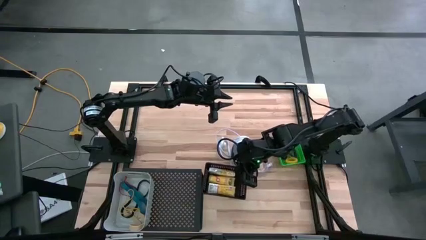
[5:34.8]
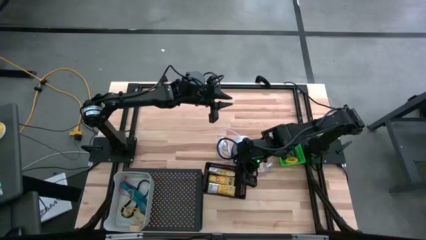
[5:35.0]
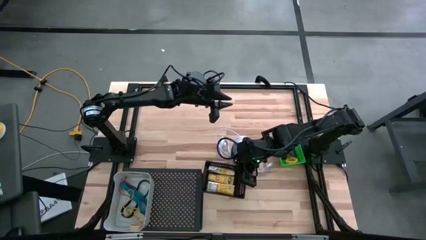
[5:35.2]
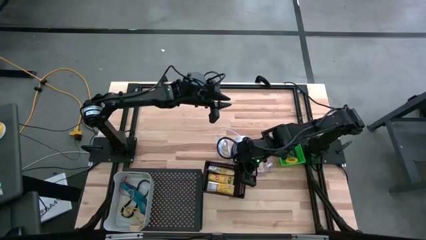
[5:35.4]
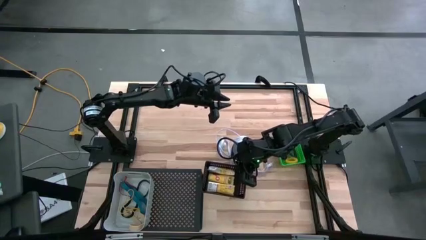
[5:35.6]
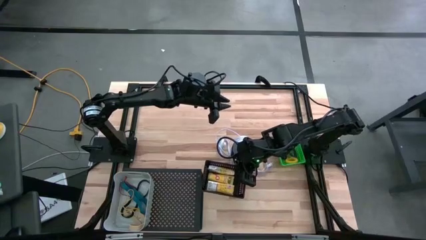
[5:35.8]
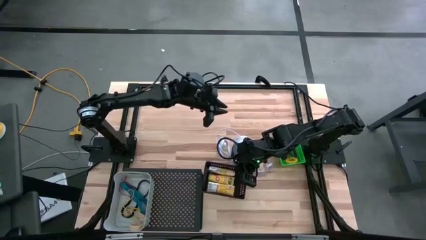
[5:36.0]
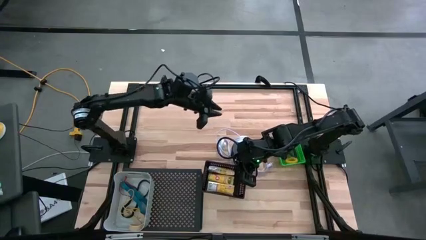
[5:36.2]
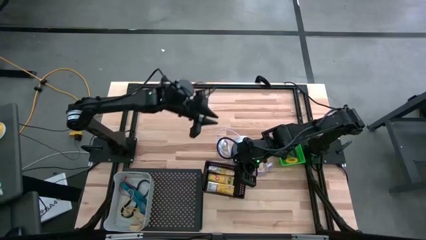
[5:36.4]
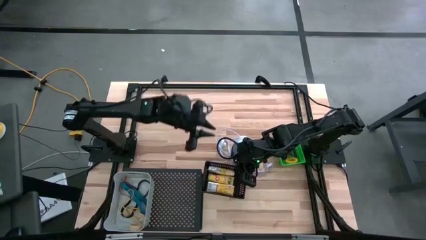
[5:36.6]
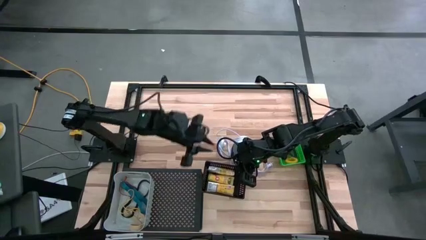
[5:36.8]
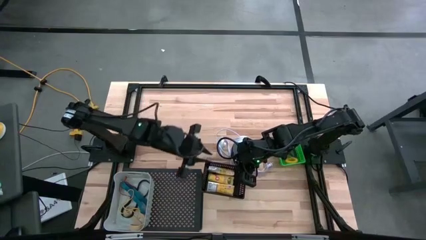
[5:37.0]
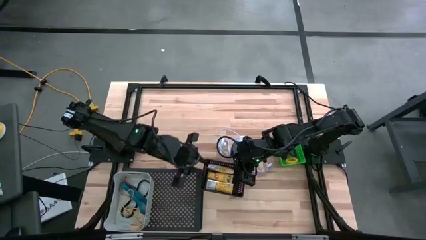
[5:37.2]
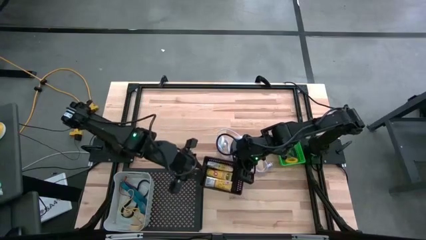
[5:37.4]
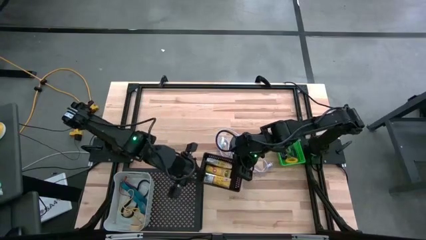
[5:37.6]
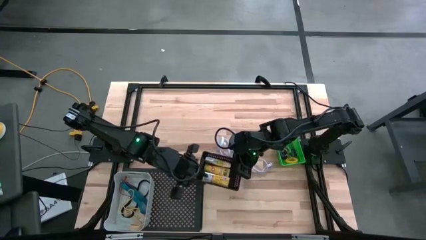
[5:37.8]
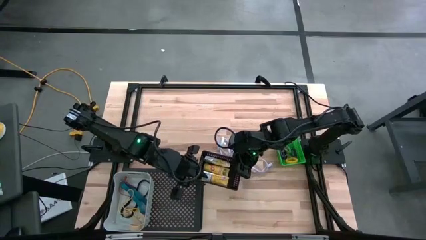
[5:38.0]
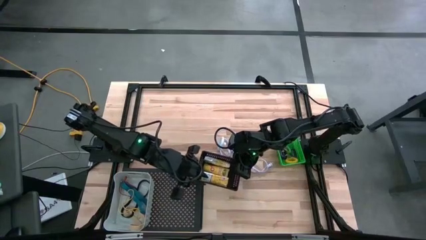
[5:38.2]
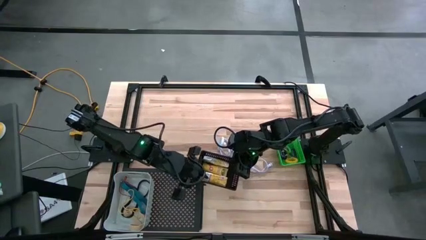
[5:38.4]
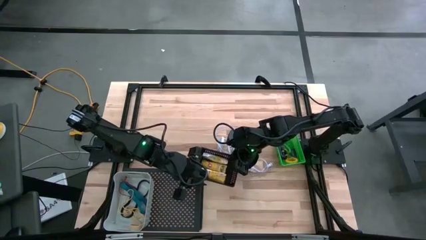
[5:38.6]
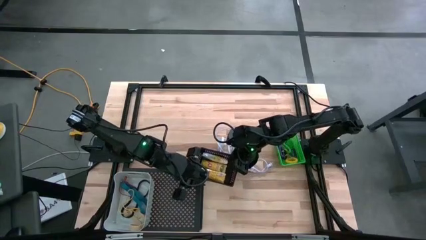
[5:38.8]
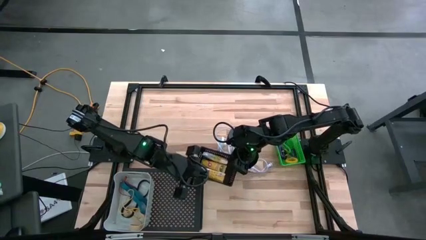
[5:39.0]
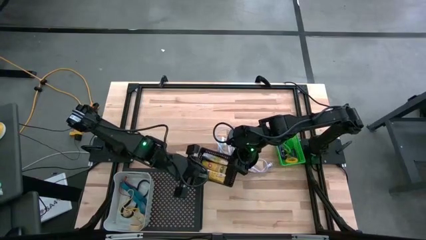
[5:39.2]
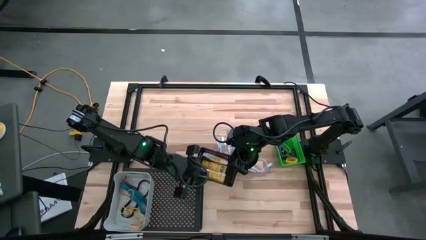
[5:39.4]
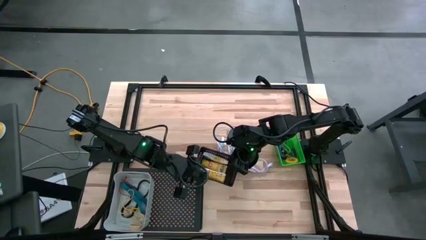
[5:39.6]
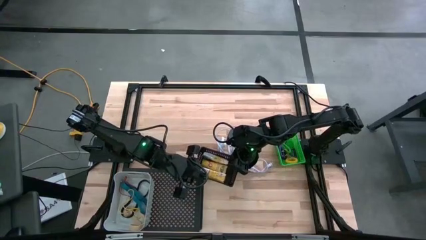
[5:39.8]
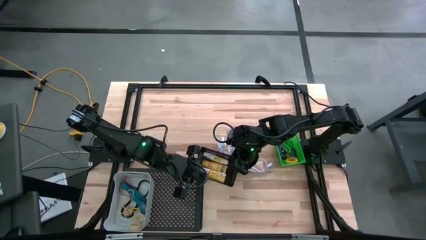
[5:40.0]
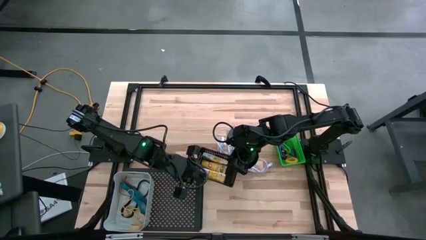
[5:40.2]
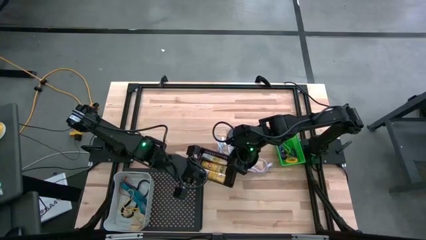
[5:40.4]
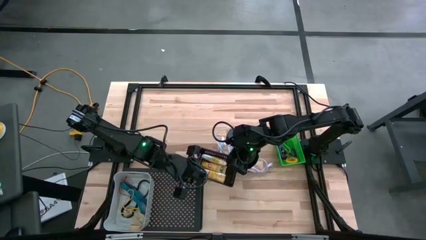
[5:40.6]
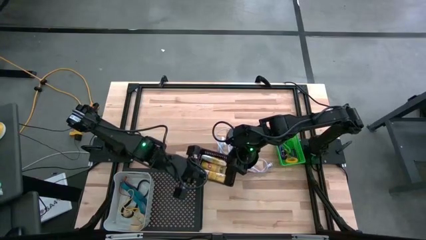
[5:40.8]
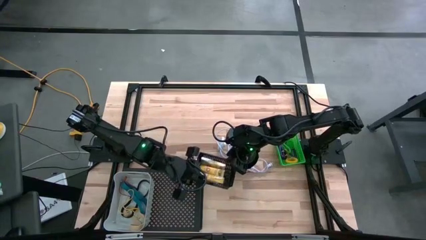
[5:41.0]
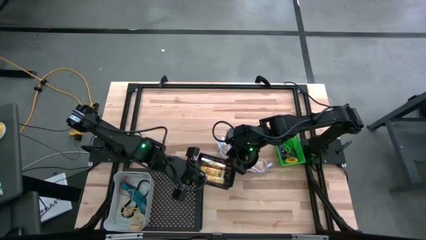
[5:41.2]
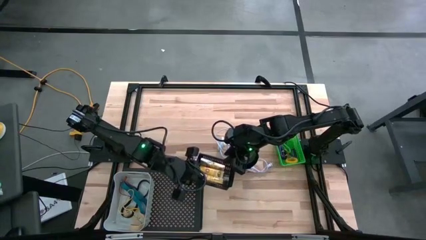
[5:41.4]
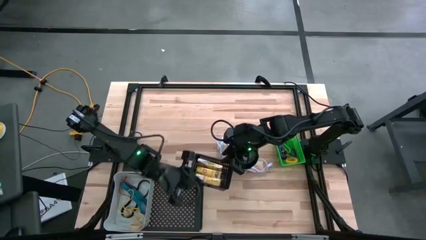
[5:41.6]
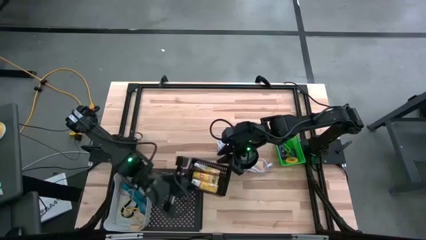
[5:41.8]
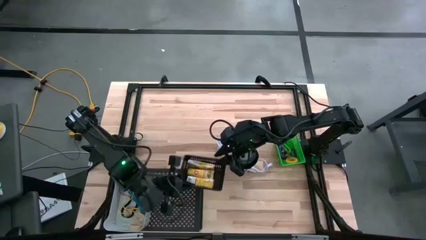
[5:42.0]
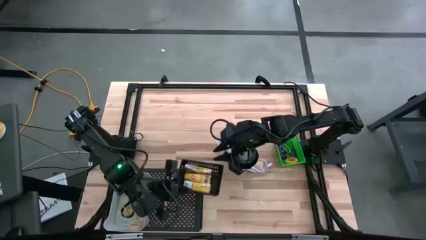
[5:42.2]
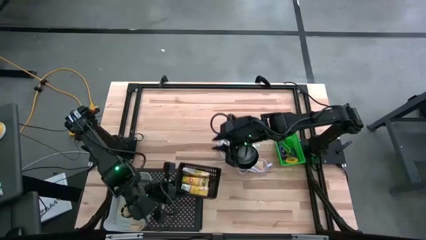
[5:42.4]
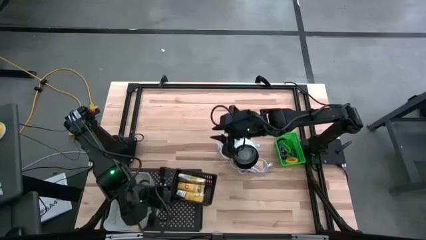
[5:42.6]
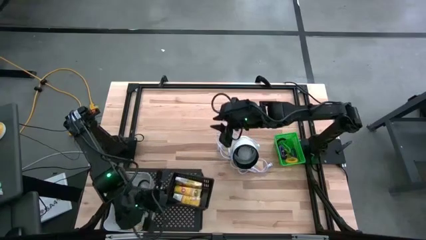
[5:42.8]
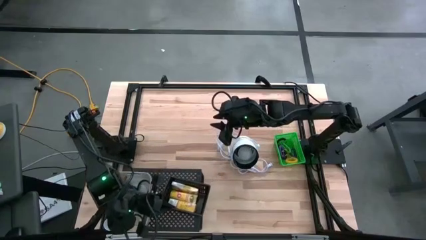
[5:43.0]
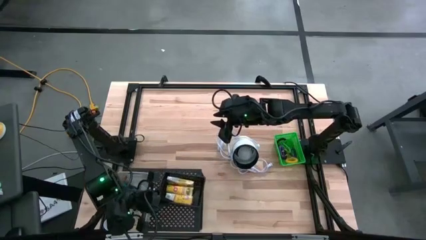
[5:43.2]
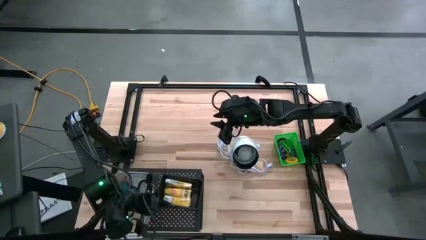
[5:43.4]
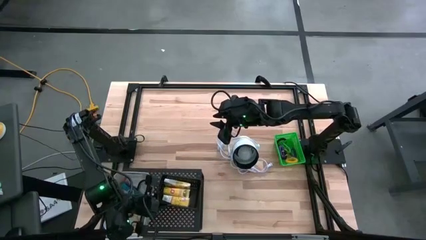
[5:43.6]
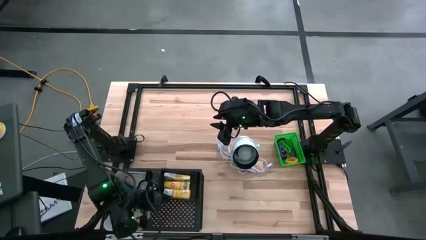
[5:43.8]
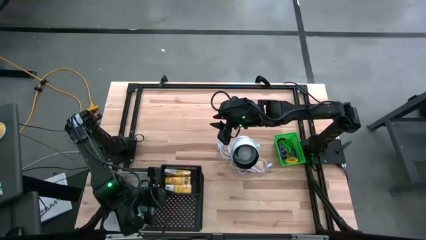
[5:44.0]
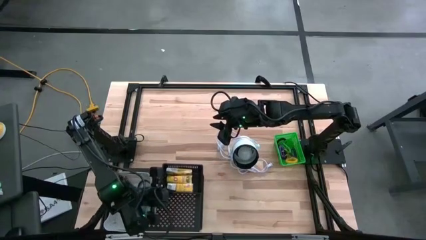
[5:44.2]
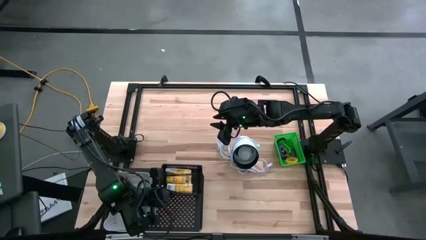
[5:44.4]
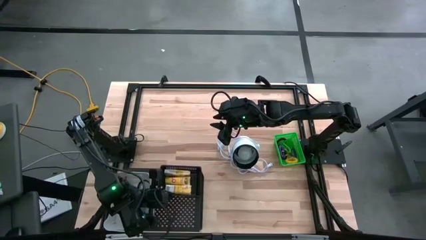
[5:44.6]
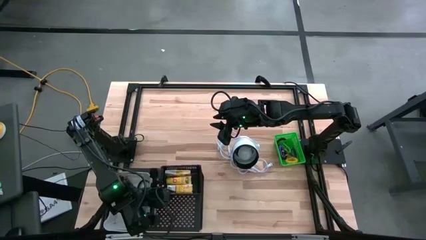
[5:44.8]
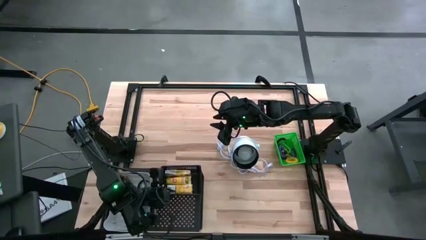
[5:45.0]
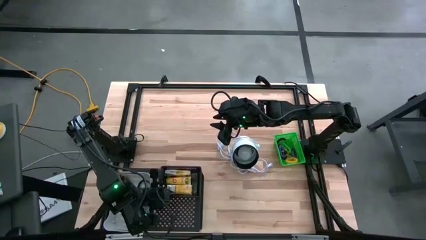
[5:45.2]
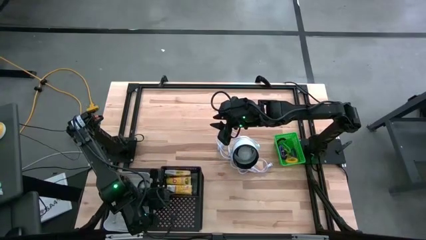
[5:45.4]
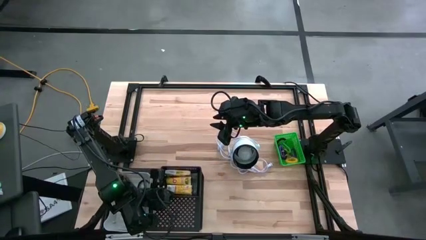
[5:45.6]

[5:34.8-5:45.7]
Task: Pick & Place Office Desk Supplies
Put the black bin on the shelf

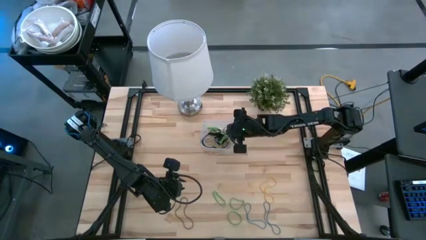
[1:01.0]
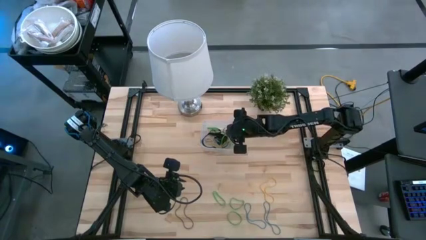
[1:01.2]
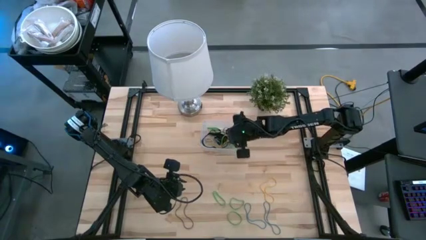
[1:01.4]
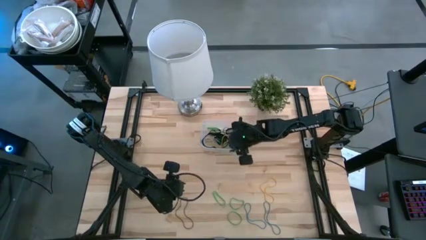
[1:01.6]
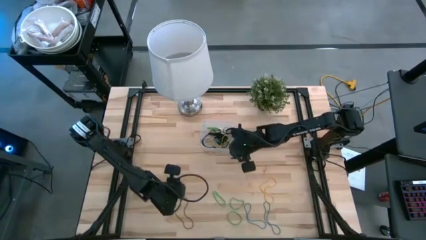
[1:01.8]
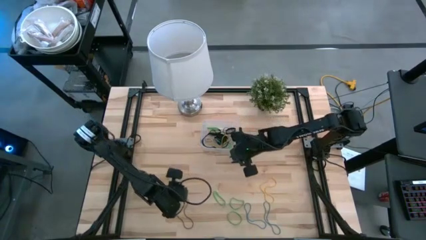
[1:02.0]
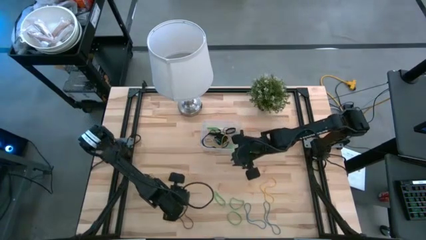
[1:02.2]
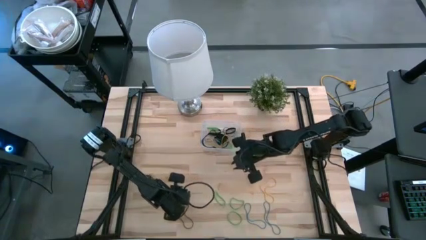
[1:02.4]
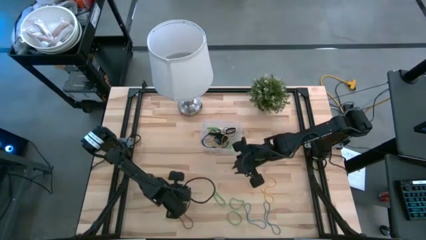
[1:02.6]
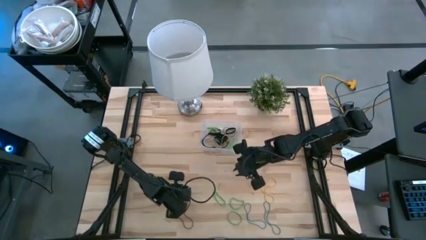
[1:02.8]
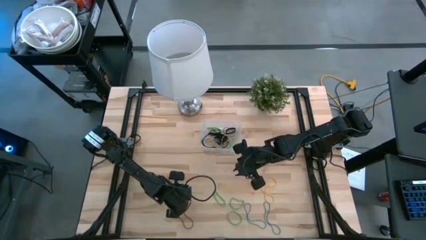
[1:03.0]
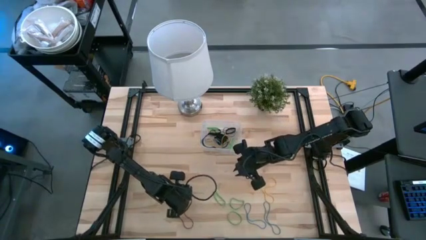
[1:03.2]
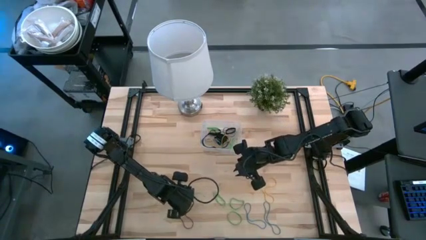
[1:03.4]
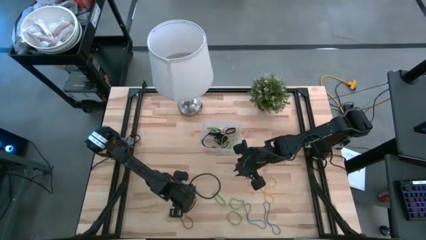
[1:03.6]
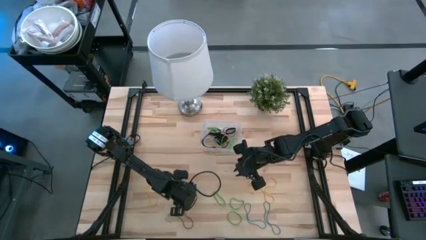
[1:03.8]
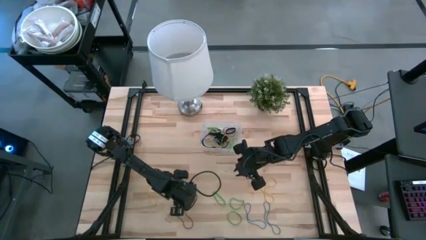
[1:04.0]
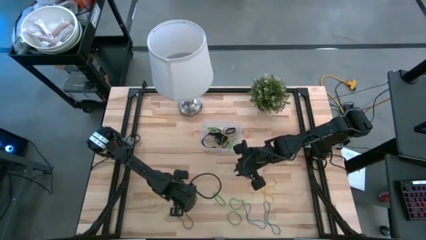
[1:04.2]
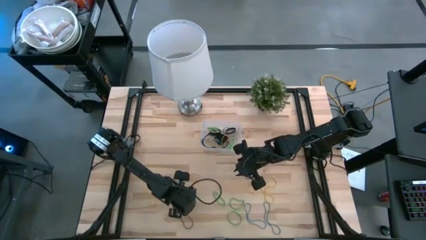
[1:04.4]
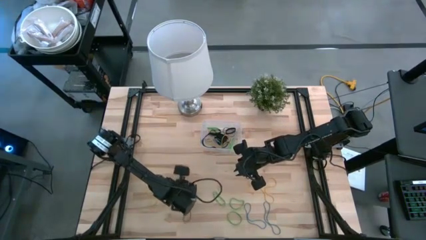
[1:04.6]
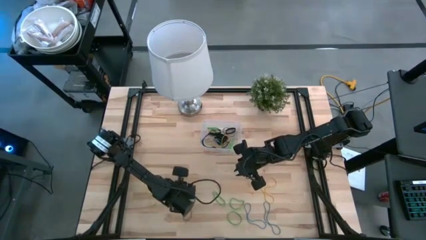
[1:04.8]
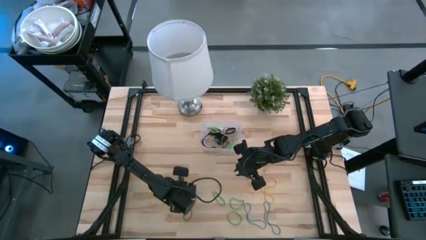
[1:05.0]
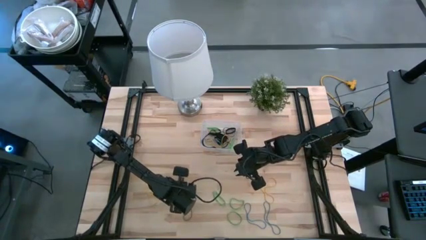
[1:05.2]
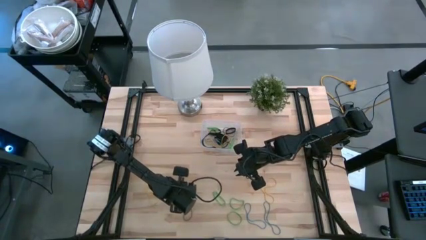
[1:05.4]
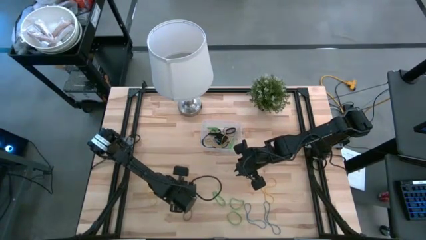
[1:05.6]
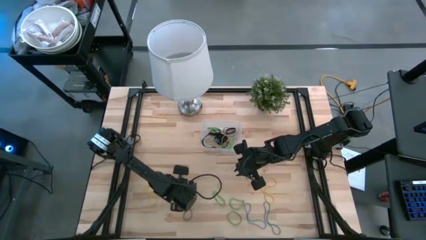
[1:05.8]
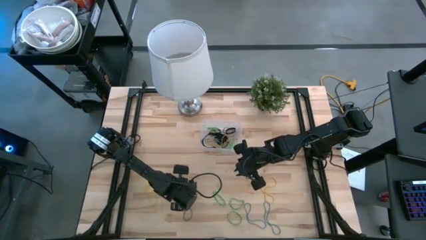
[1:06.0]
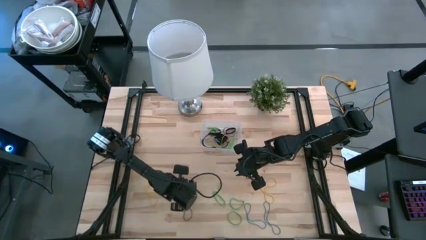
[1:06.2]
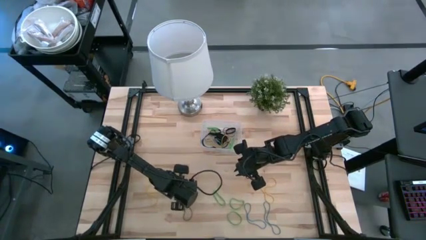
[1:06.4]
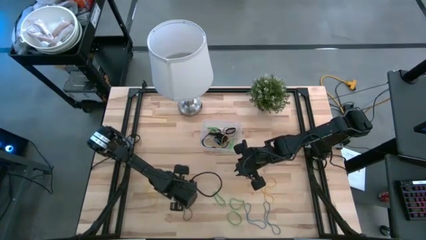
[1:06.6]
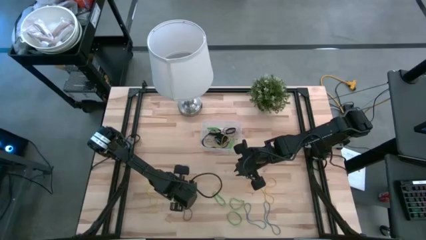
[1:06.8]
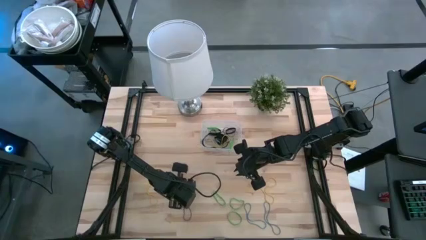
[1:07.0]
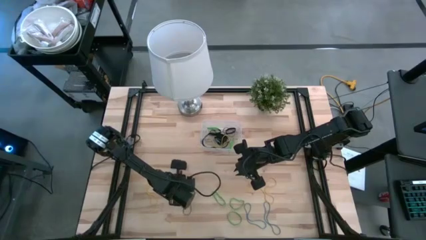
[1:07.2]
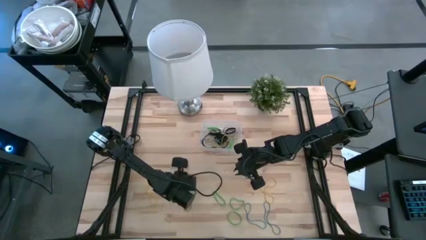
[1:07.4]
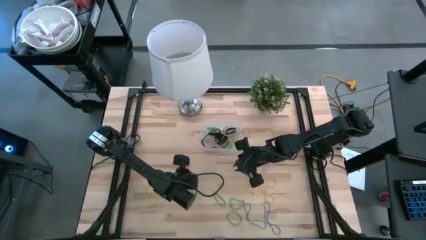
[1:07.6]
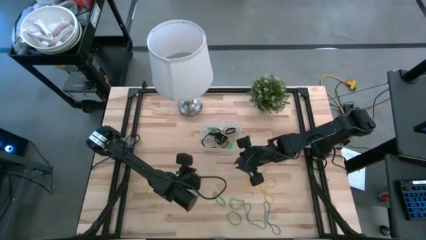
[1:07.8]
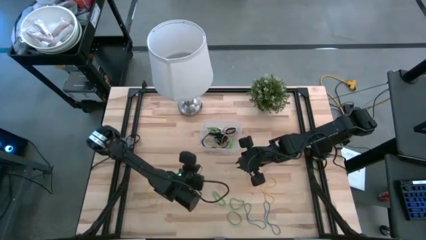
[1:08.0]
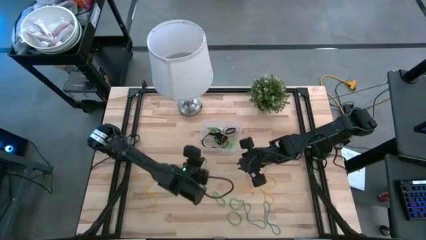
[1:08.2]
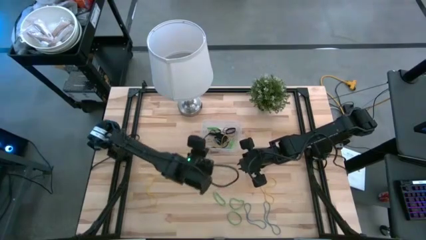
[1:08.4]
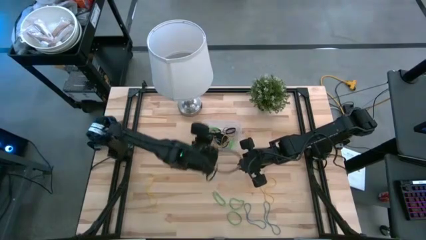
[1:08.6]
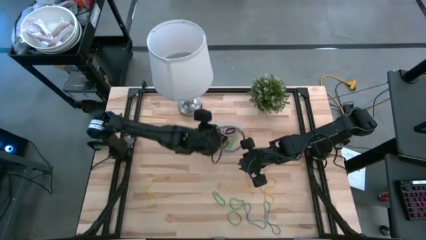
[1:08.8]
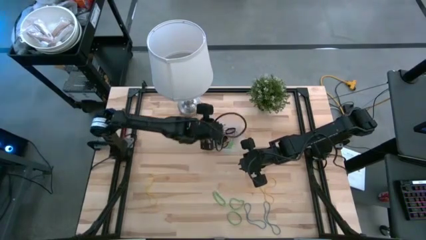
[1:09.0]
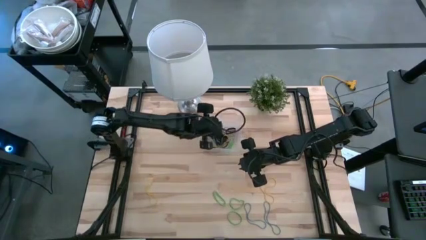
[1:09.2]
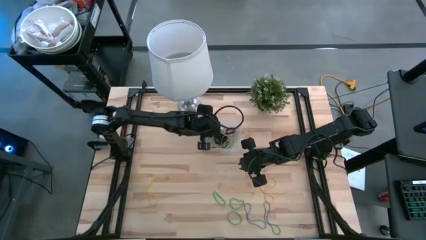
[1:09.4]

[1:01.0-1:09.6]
Task: Pick and place rubber bands into bin
Put the purple rubber band into the transparent bin
